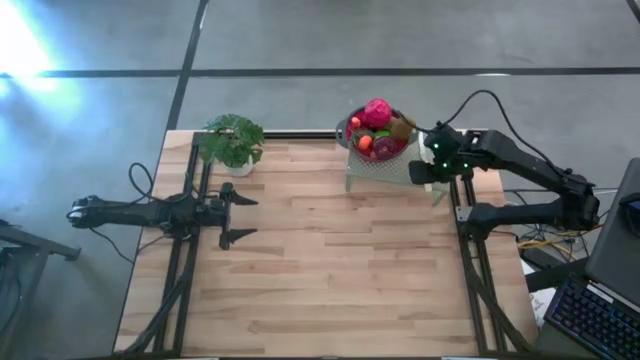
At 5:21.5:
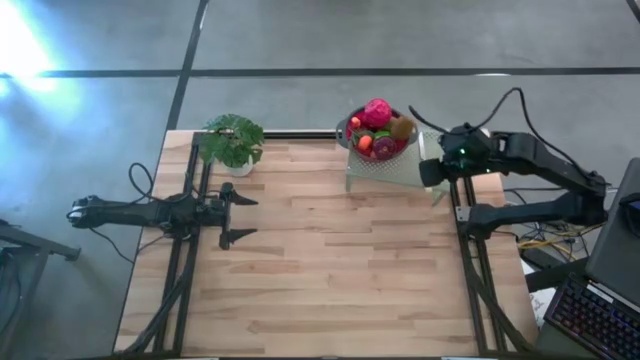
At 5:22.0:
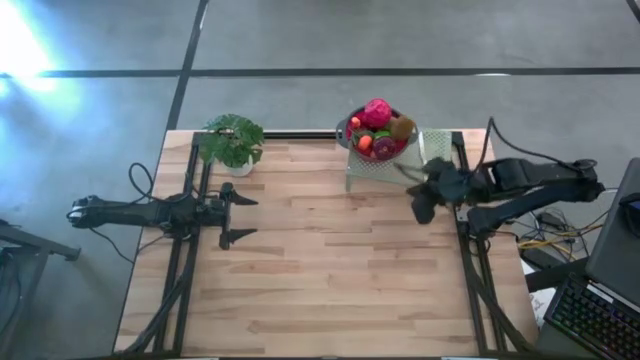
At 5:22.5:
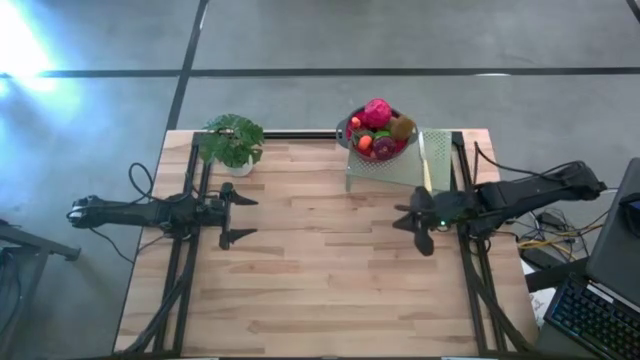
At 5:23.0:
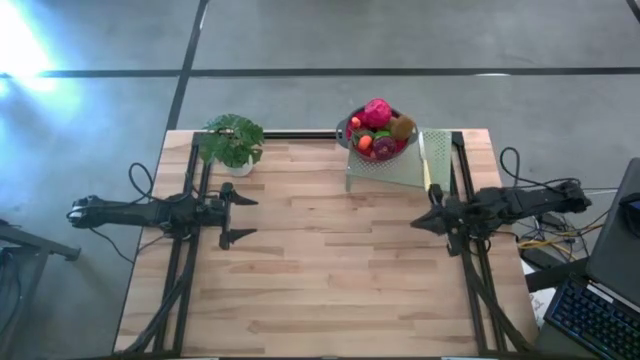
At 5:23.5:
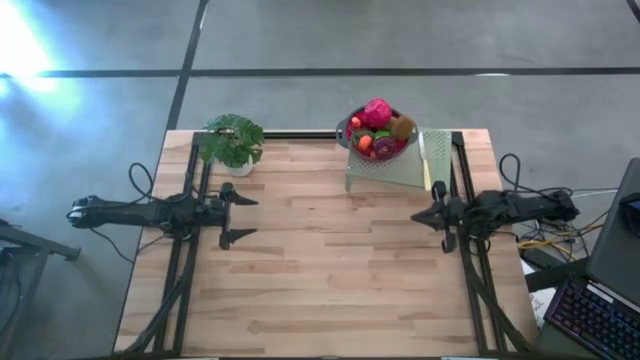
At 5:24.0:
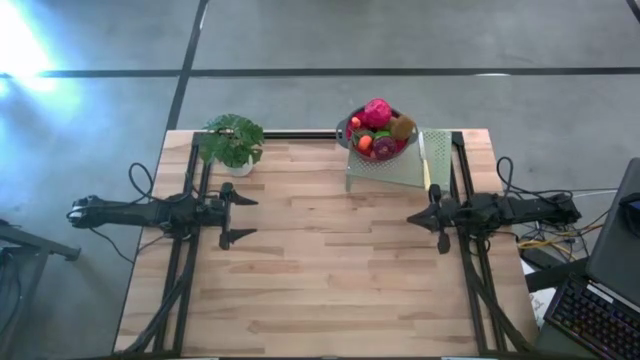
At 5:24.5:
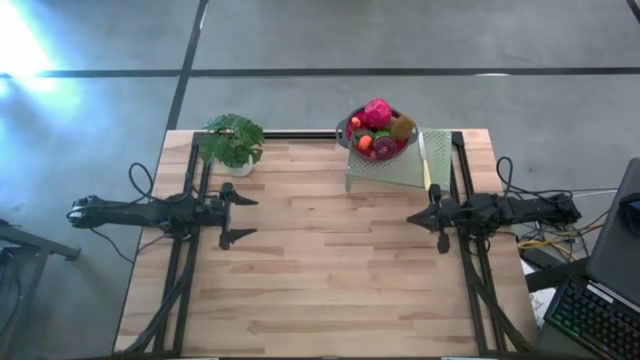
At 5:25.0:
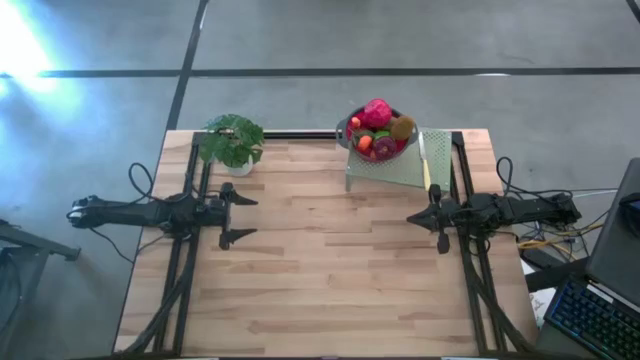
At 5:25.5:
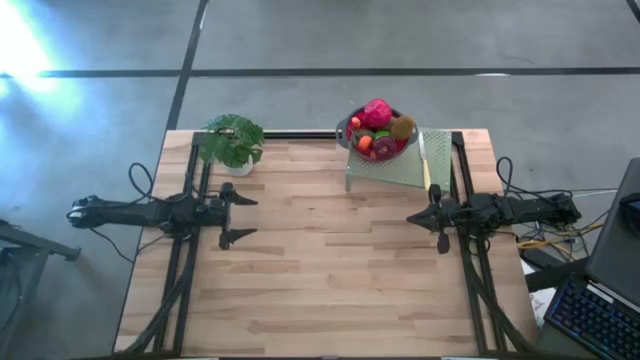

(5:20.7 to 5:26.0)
Task: Pick & Place Fruit
Return to Home Position

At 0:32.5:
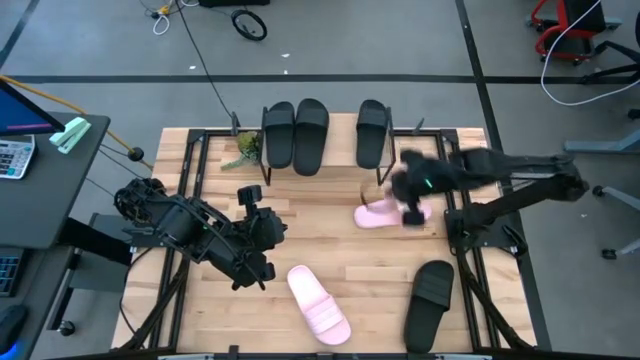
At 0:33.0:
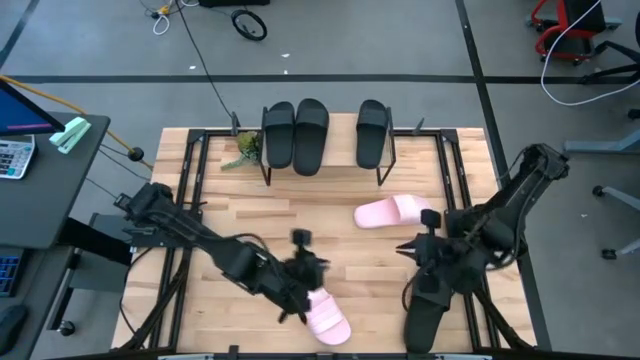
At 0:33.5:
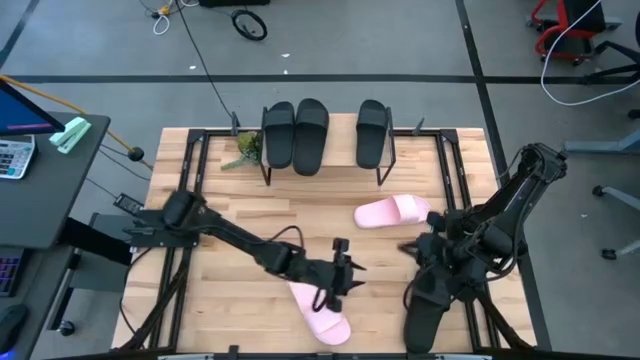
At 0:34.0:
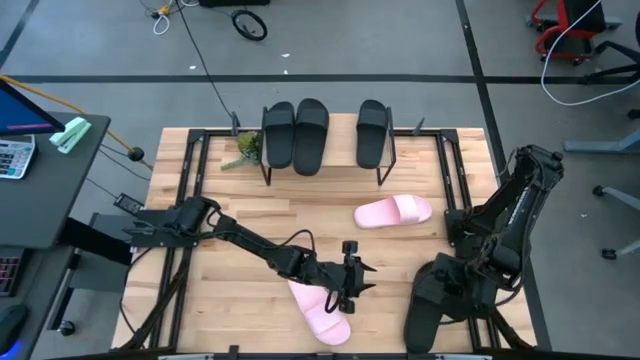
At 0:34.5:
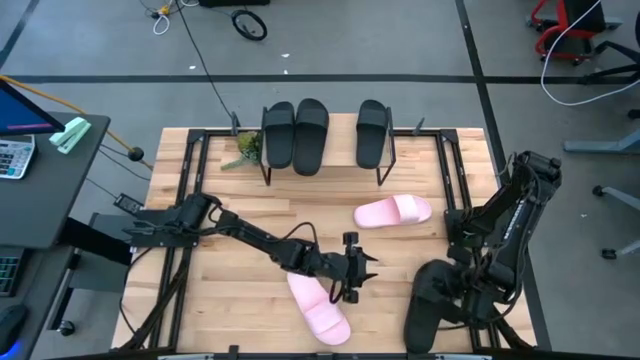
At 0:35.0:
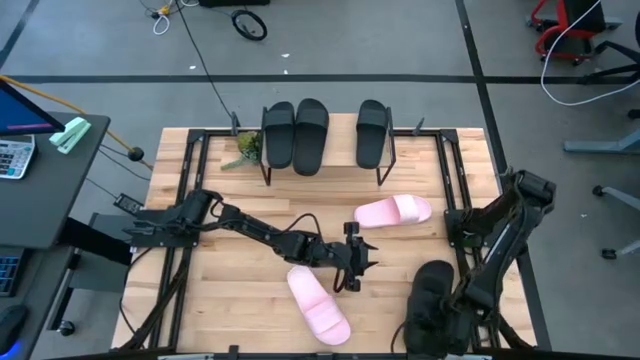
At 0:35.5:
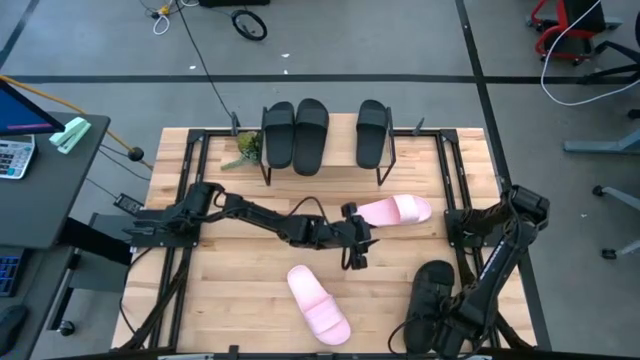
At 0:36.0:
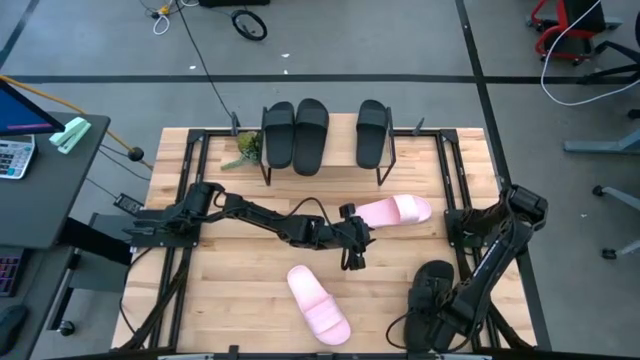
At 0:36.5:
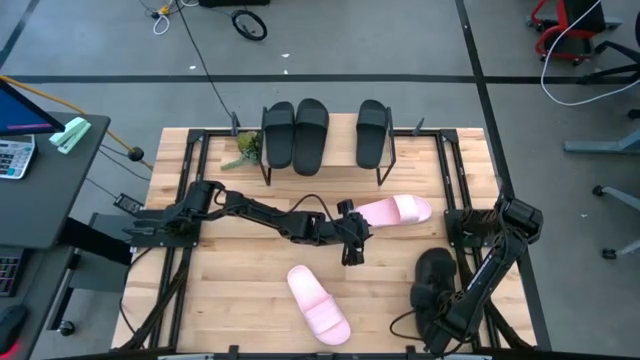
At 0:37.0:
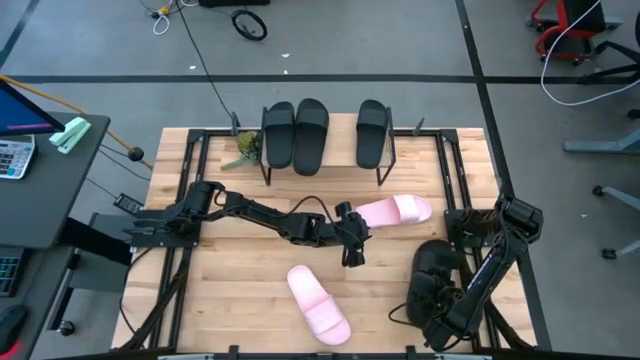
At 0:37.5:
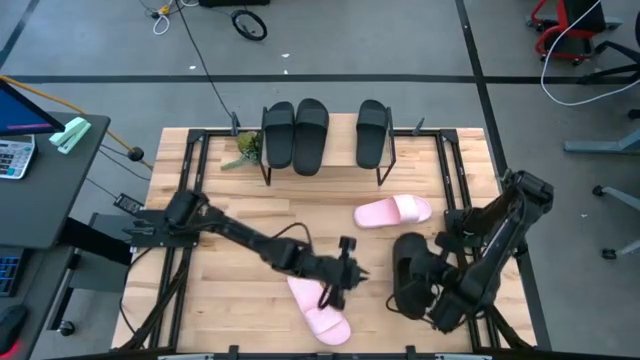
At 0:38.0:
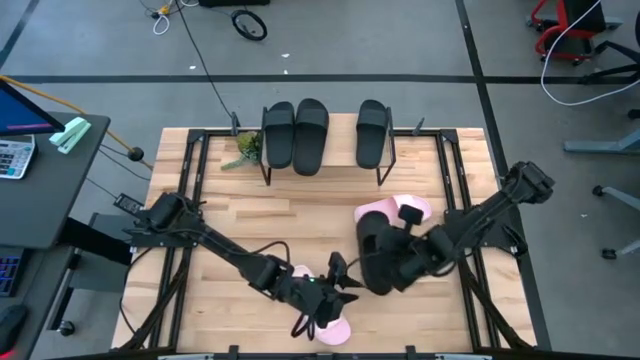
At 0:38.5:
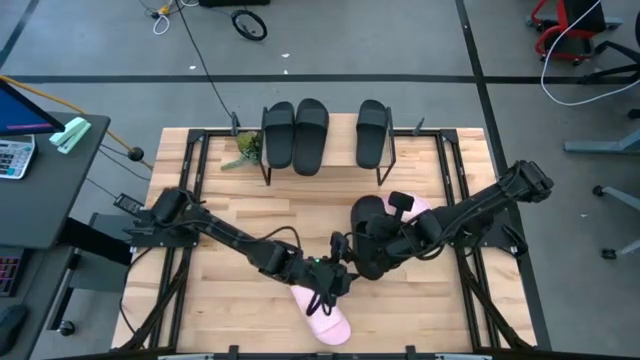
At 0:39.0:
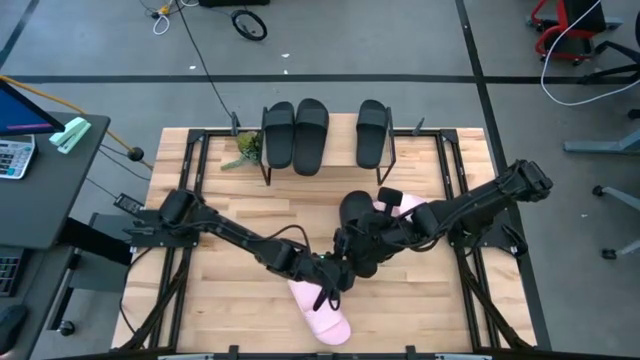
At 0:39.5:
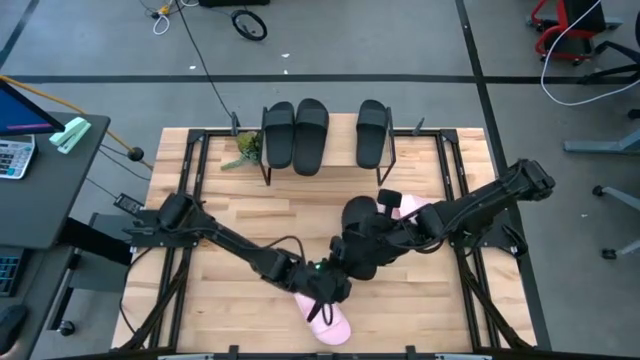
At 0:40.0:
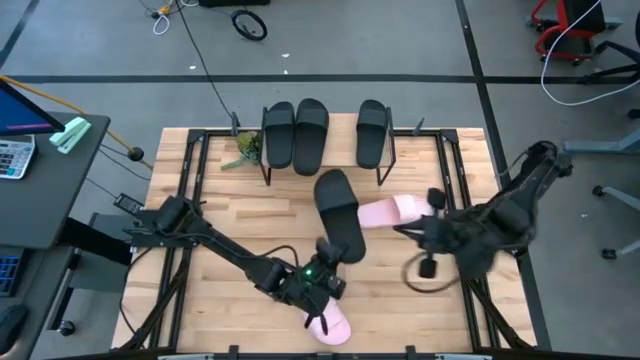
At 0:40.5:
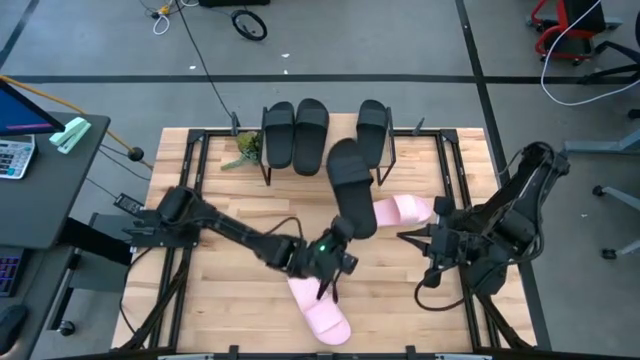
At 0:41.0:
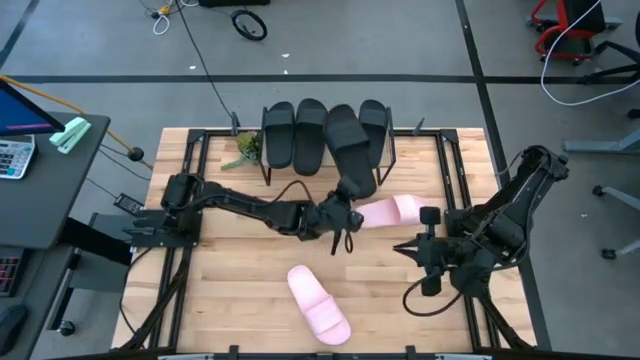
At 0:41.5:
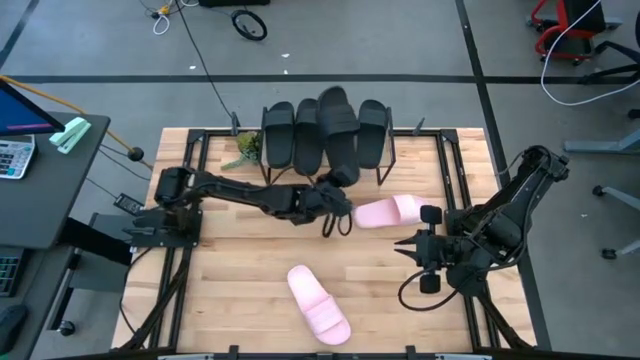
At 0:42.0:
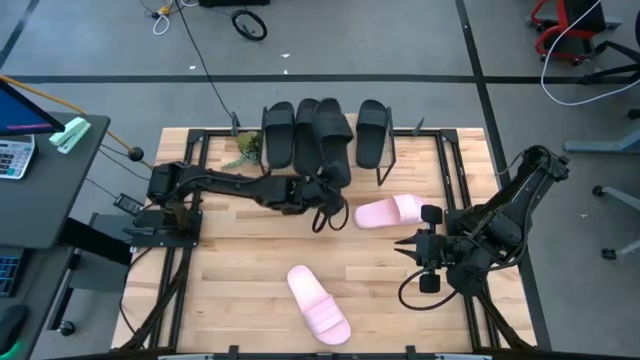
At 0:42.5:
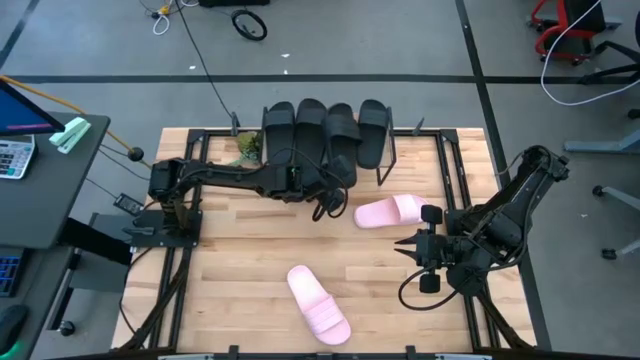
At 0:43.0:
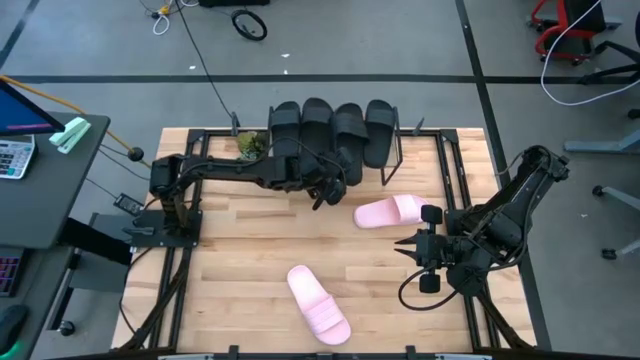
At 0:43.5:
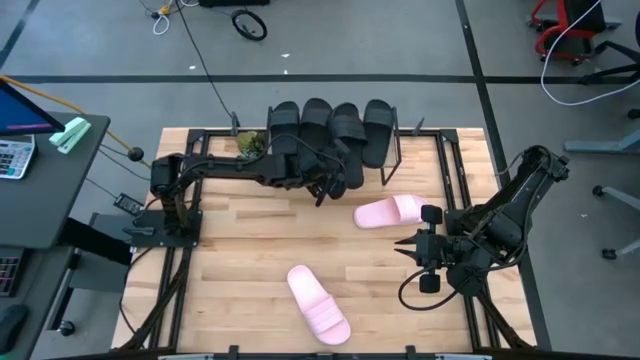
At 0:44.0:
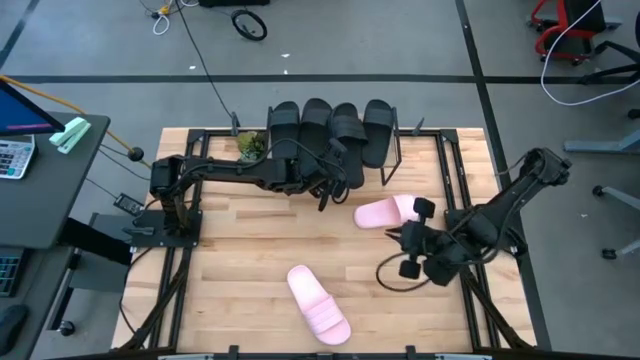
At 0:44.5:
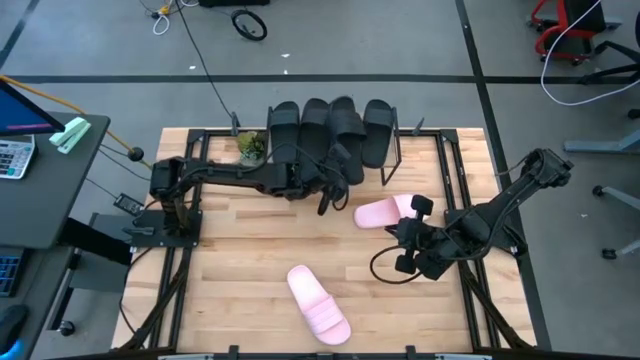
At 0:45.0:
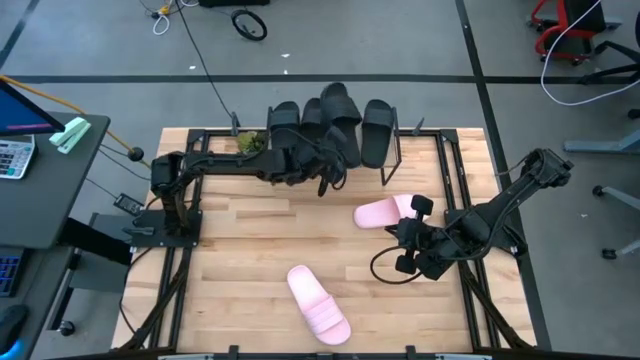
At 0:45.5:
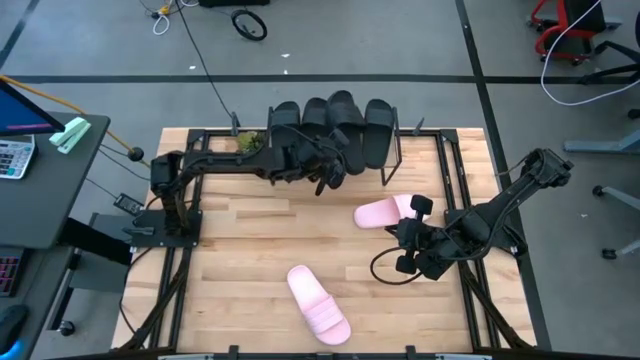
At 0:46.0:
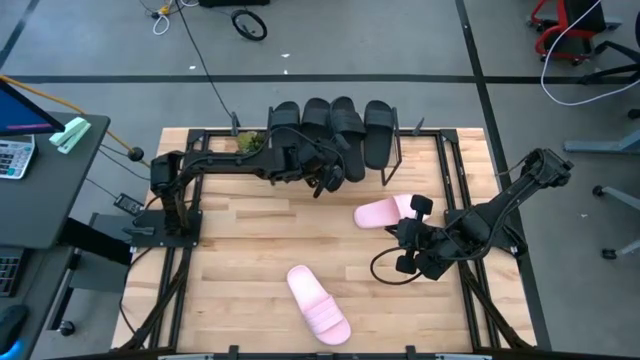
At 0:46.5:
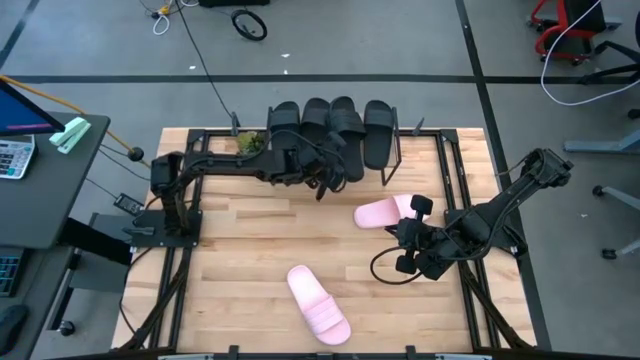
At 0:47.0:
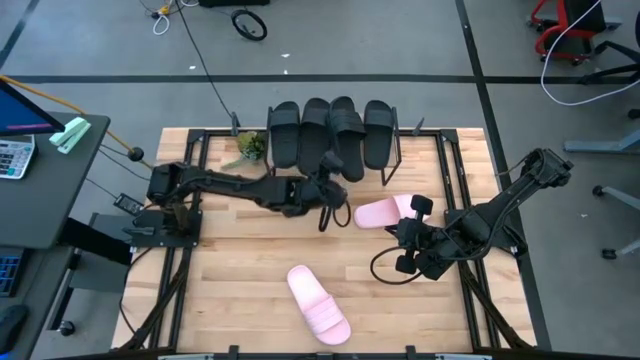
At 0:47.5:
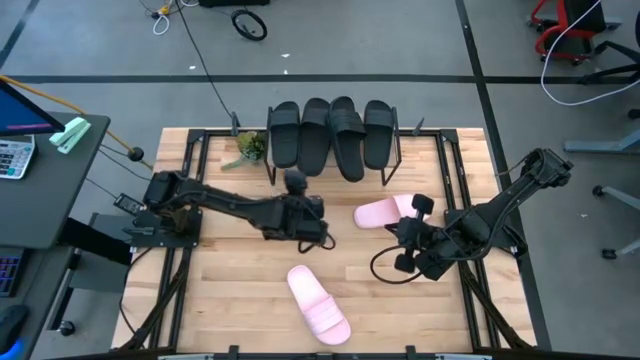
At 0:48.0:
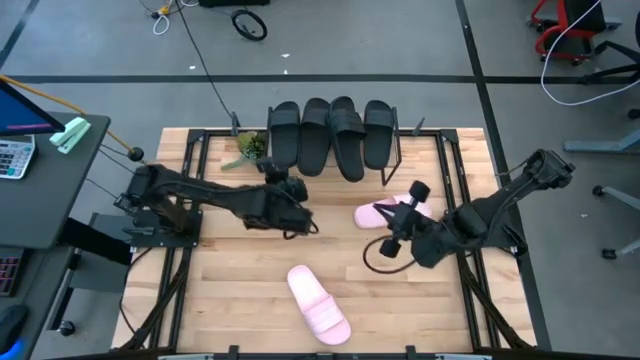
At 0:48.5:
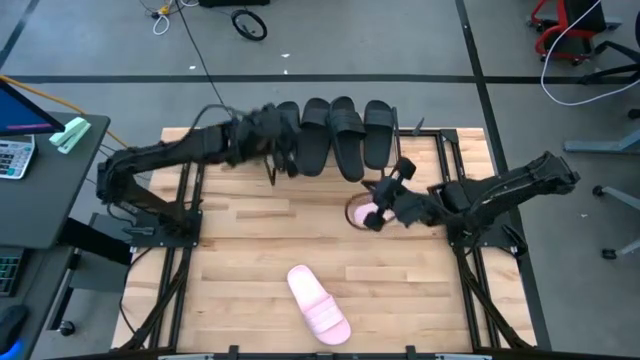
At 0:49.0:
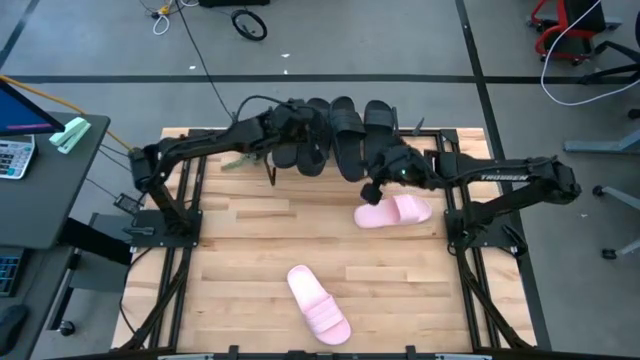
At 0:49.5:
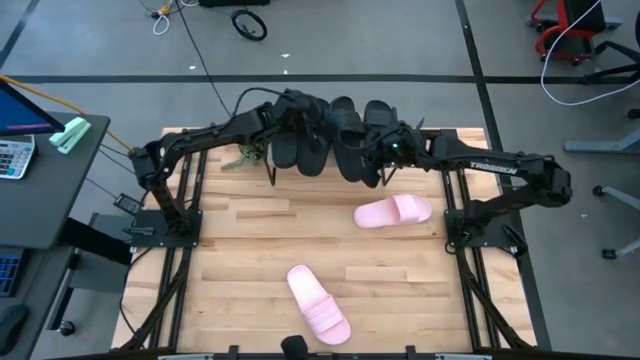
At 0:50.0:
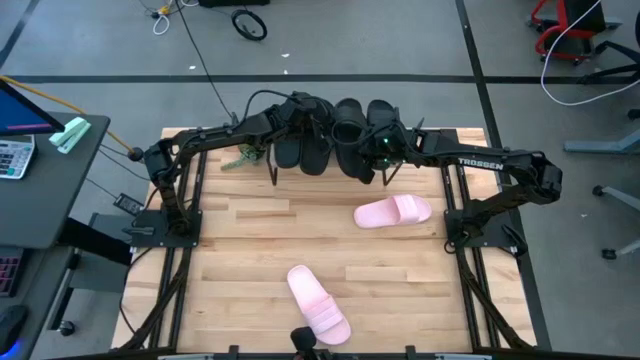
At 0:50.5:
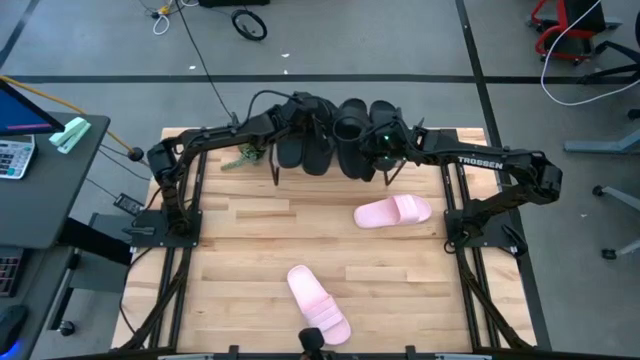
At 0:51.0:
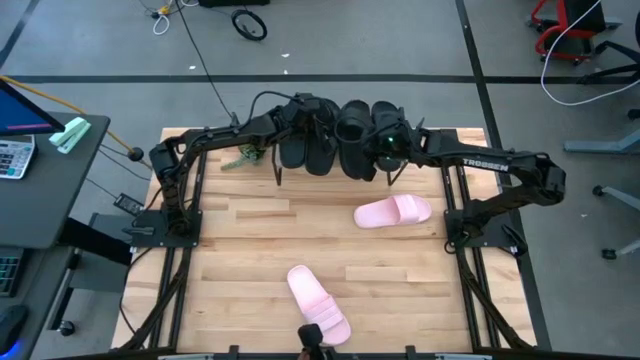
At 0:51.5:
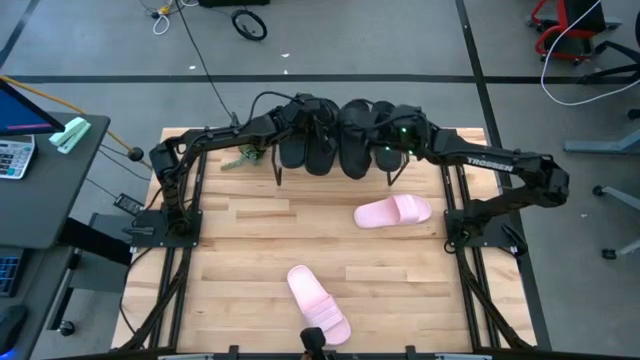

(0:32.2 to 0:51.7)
Task: Pick and place slides into the shelf
Put the black slide on the shelf
